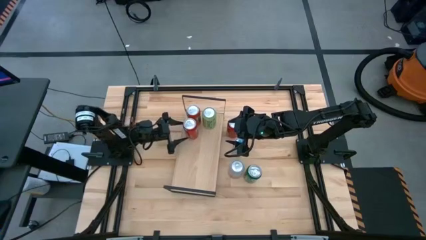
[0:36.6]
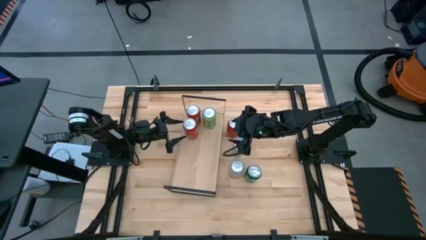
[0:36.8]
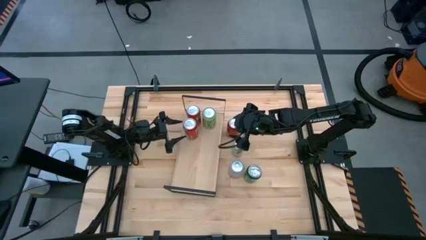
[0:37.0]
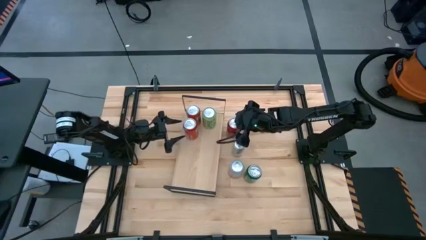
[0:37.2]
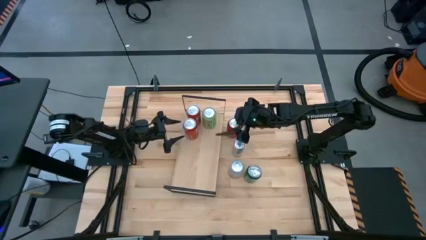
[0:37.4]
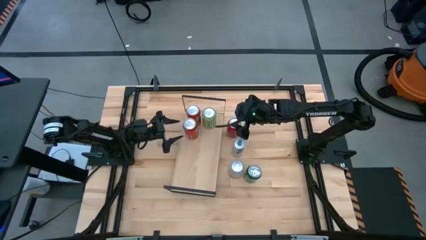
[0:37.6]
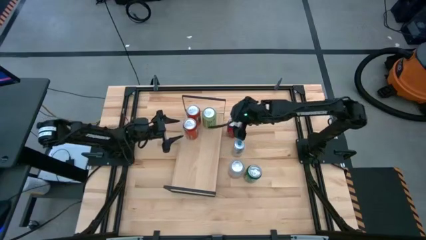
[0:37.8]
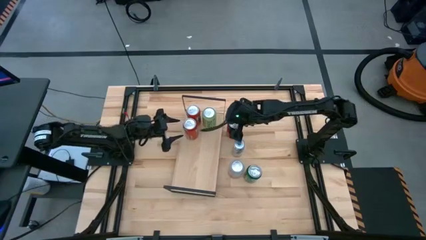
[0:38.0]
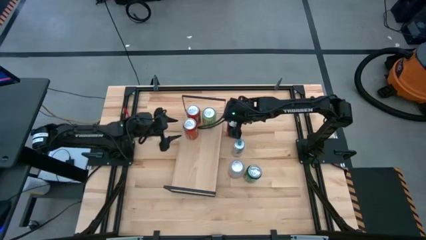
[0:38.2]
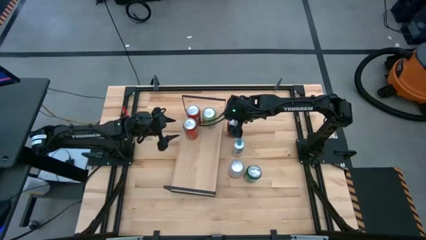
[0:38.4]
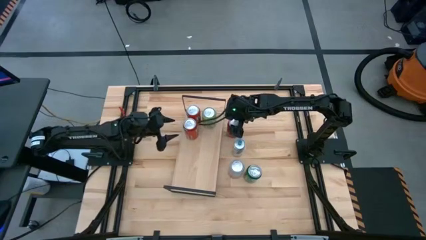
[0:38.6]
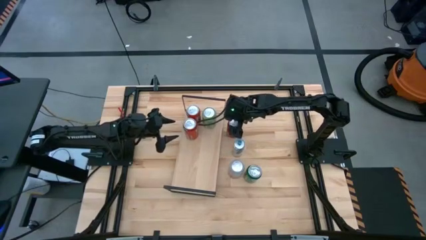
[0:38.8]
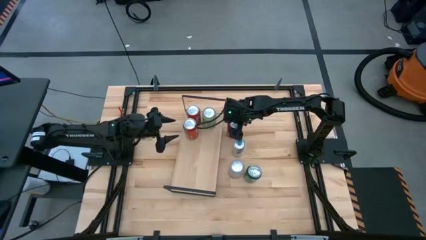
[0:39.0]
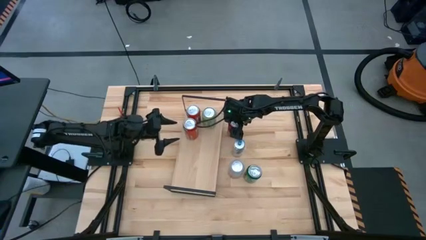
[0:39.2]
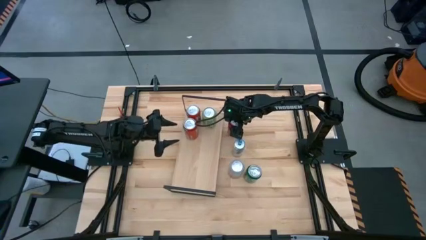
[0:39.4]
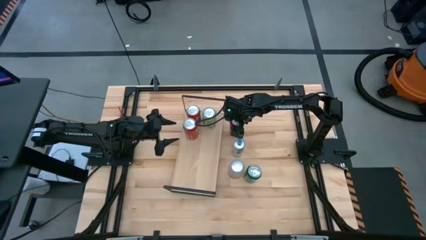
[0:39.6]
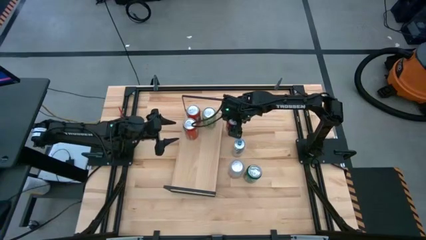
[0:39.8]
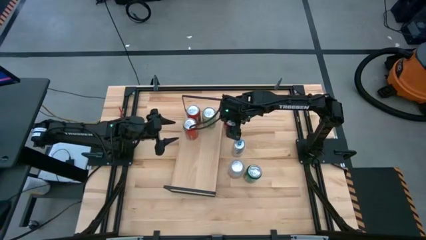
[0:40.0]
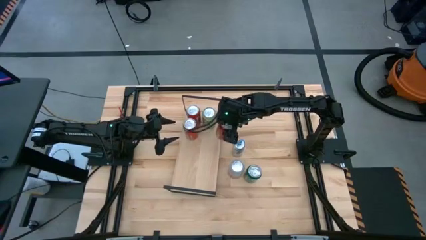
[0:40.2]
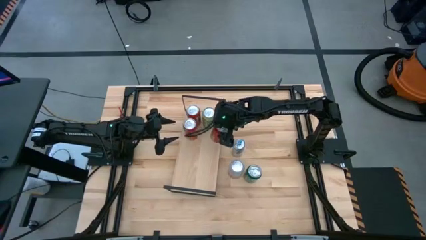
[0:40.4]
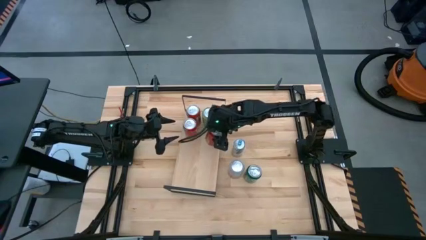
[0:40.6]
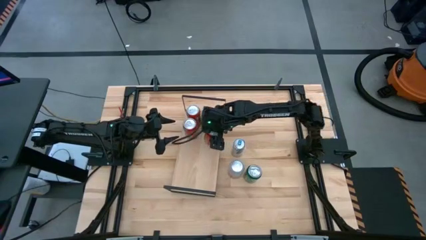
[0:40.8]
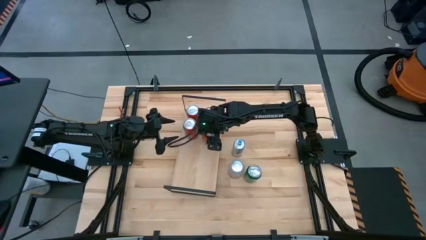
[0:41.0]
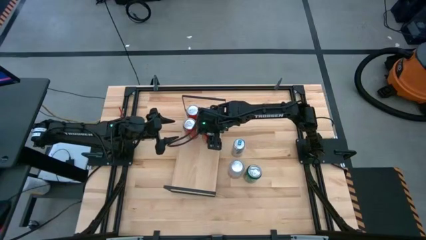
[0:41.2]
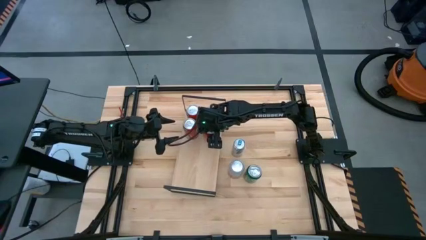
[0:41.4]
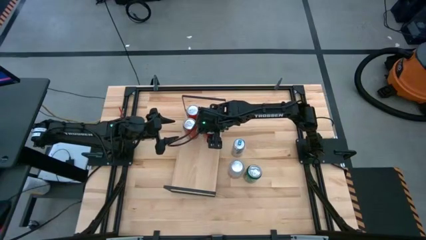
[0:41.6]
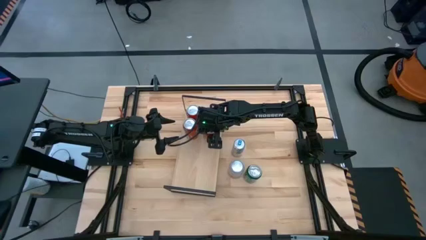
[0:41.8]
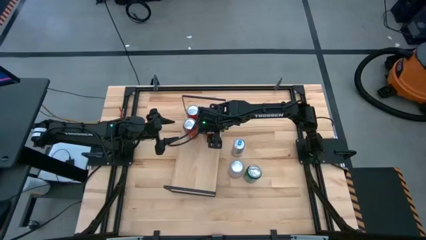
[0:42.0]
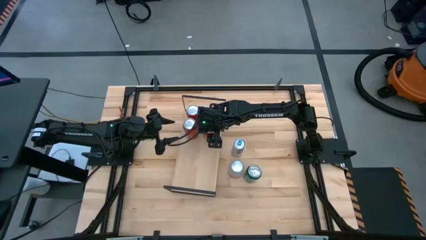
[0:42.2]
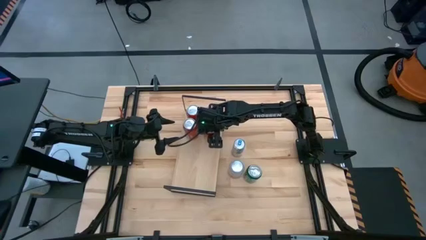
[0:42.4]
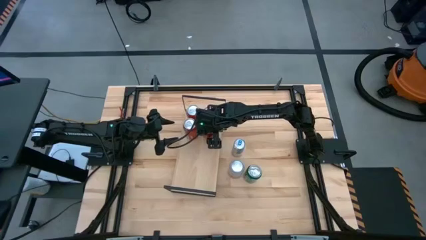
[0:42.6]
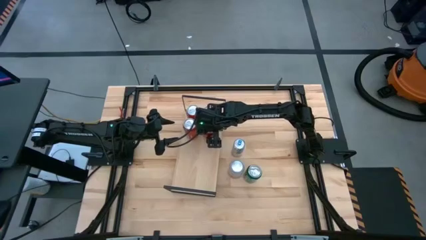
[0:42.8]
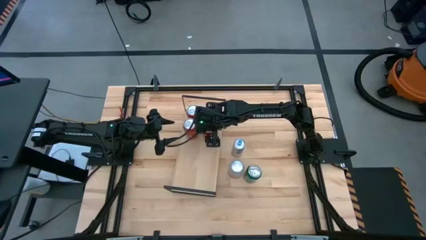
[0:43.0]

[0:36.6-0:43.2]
Task: Place canned beverage on shelf
Put the red and black soda can on the shelf

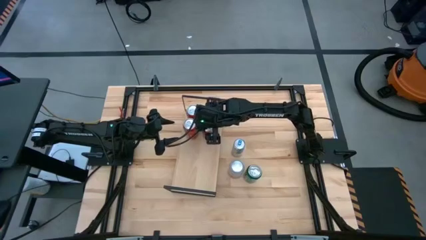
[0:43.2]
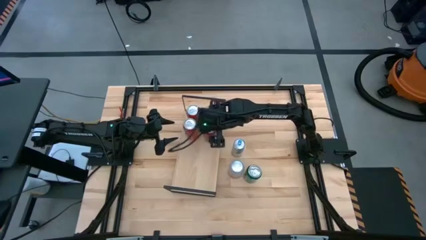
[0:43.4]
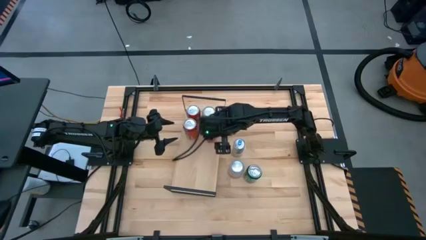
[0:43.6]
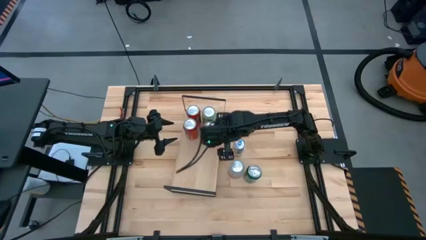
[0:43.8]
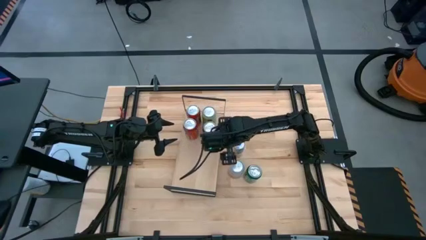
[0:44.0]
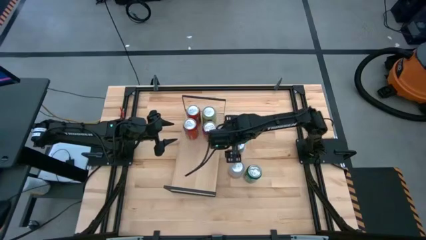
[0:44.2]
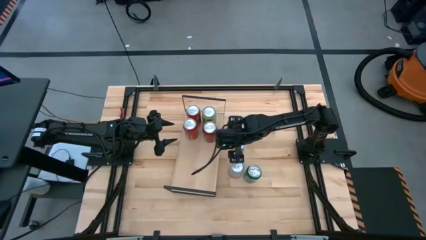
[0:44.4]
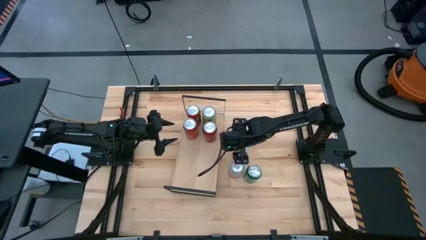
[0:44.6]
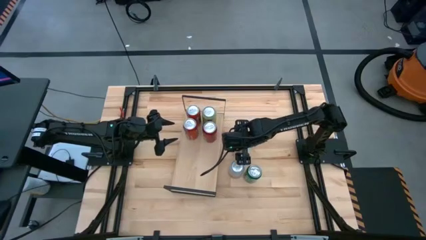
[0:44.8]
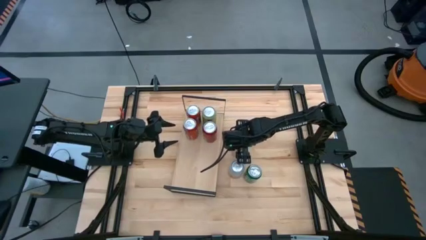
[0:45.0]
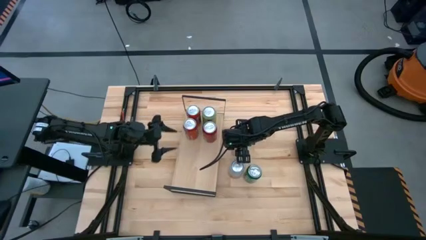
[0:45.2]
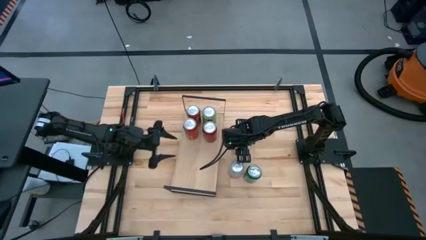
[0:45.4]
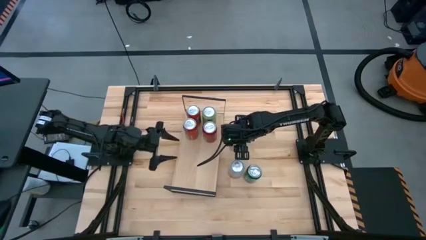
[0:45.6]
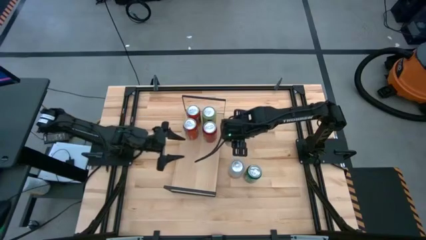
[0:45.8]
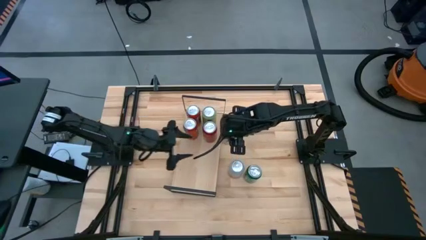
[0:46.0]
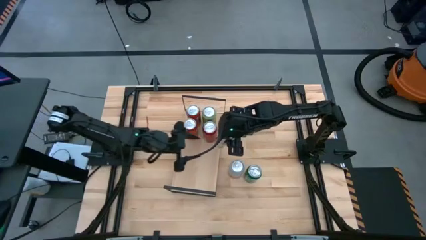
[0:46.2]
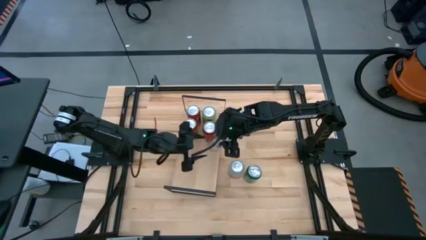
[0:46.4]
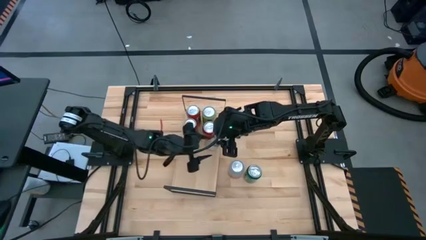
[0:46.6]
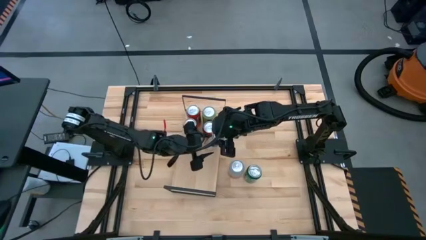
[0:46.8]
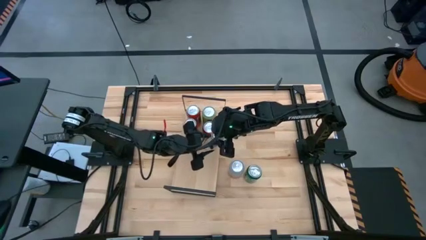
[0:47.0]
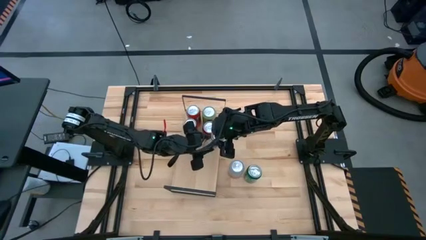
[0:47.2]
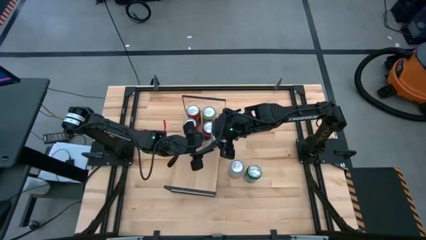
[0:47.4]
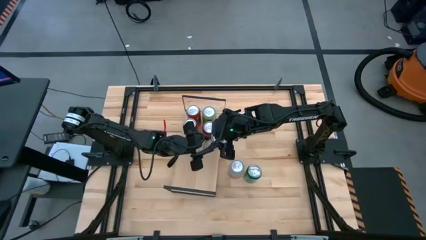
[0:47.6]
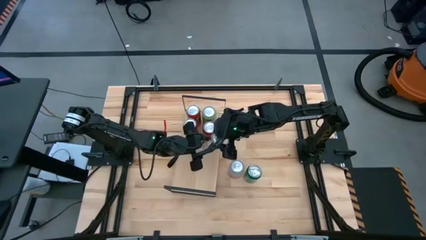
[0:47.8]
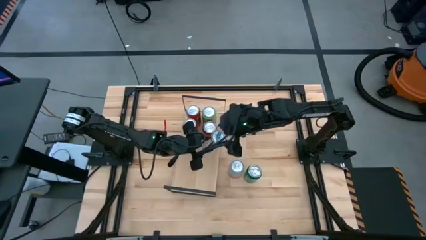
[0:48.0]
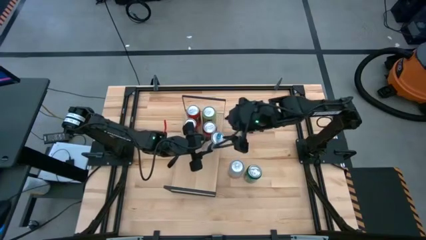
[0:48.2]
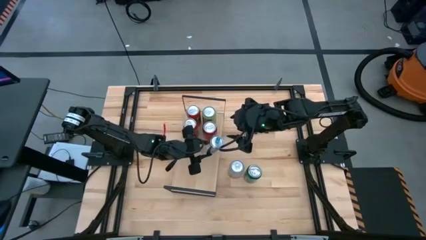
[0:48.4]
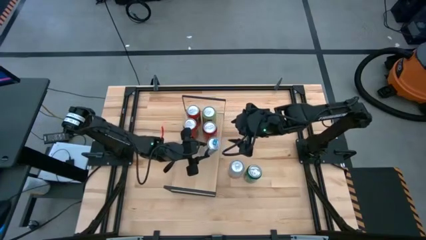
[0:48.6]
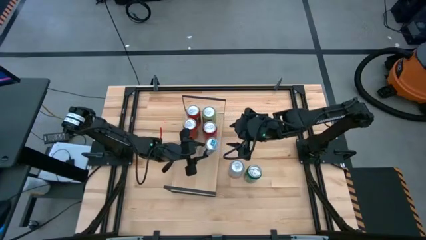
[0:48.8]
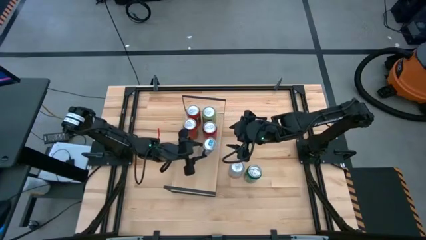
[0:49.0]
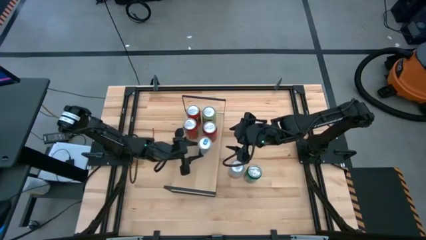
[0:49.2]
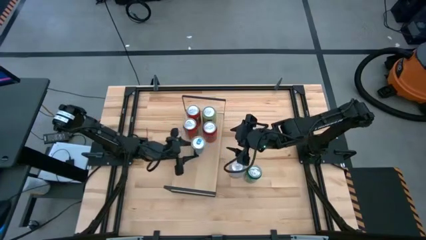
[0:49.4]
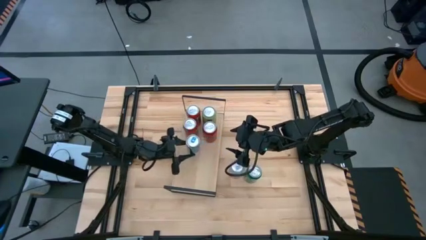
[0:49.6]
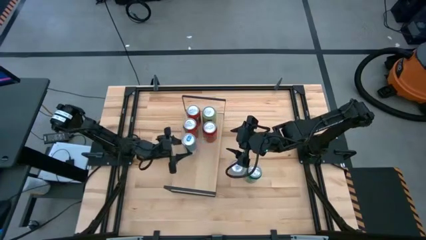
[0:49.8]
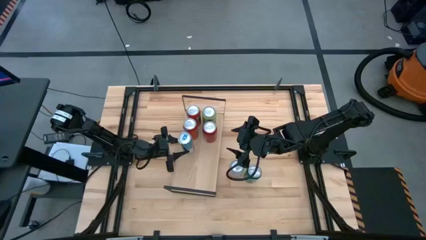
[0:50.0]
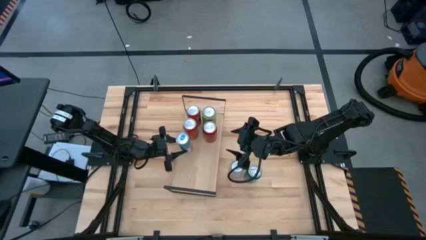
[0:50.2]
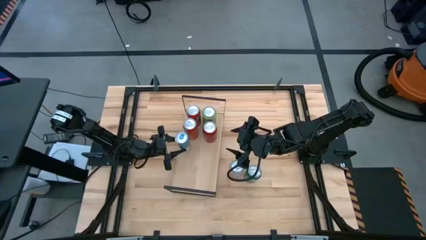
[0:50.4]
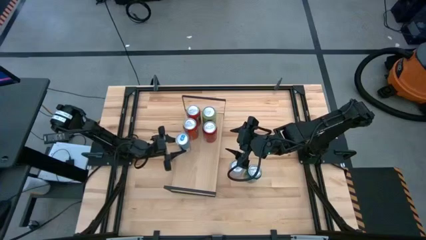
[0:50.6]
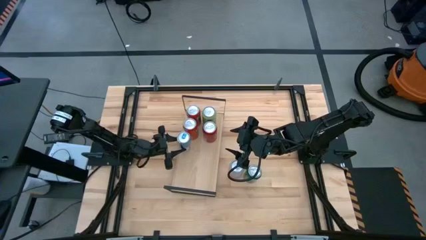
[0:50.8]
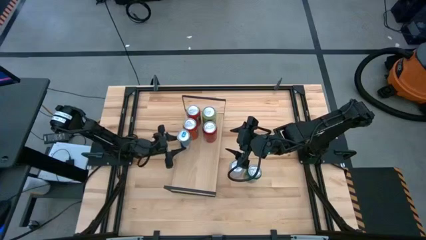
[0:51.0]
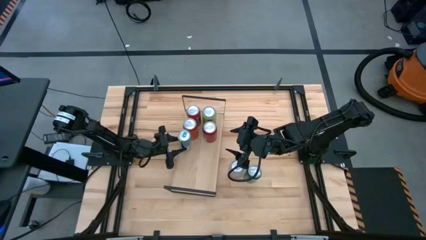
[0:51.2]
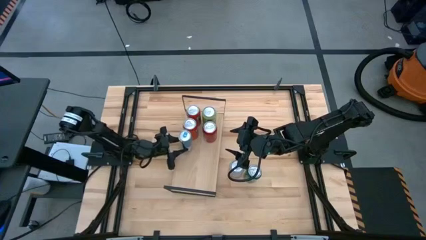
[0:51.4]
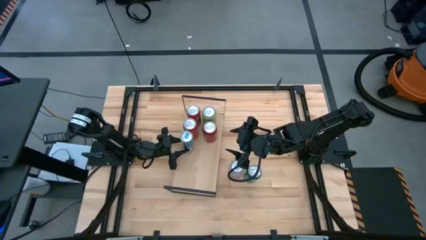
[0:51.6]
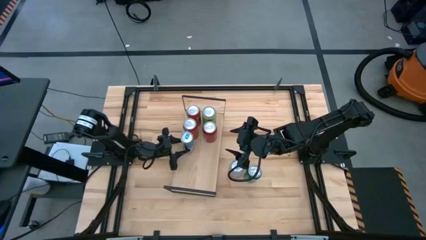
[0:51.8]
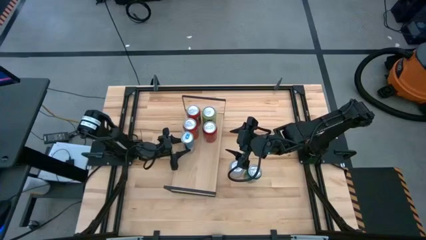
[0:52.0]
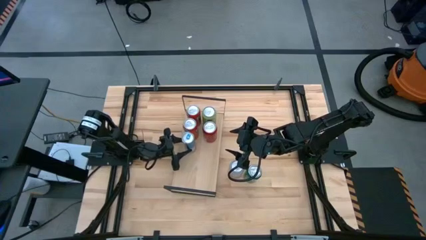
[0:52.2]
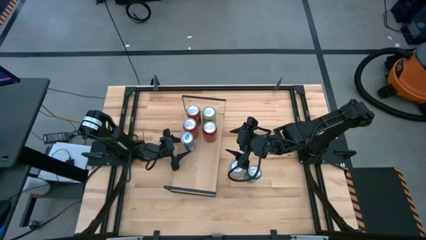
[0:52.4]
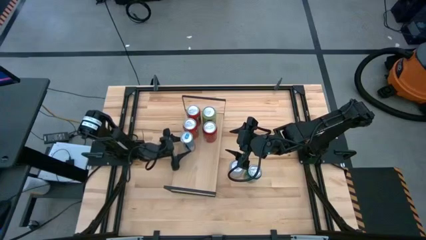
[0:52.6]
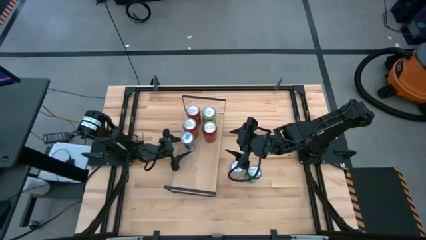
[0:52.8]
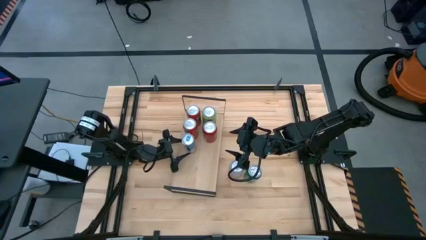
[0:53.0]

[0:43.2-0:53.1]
Put the blue soda can on the shelf
